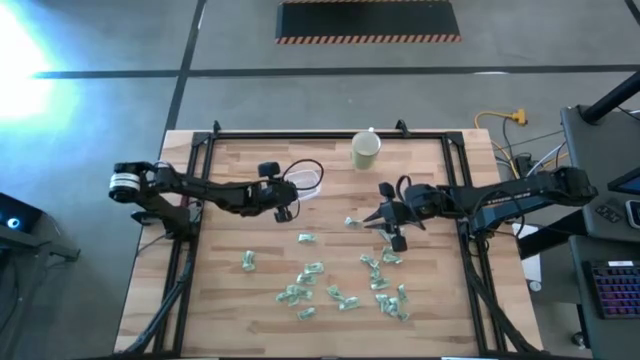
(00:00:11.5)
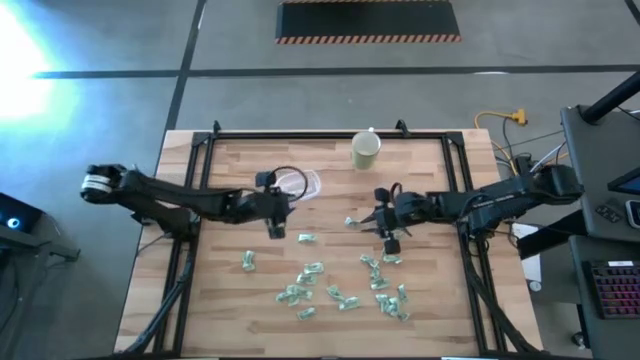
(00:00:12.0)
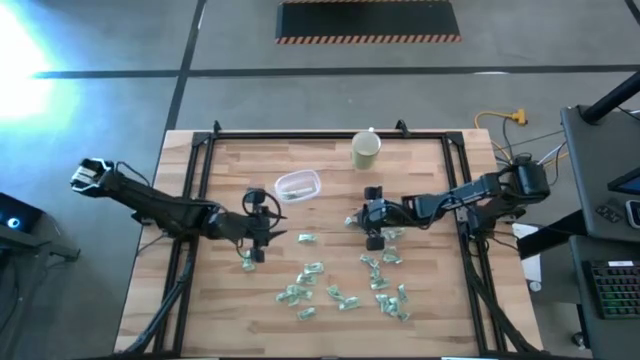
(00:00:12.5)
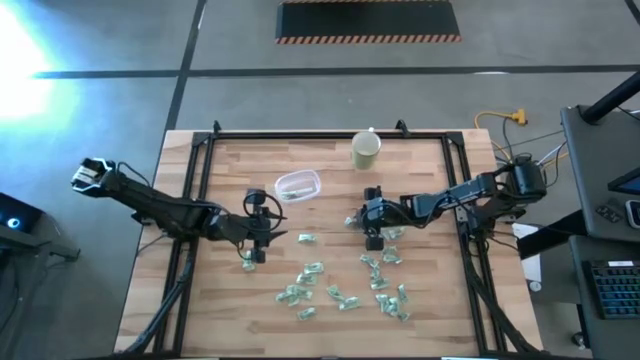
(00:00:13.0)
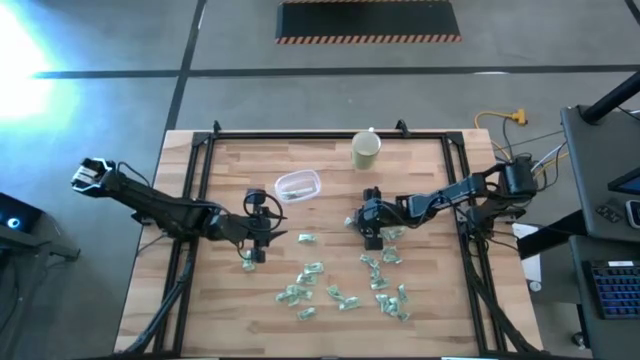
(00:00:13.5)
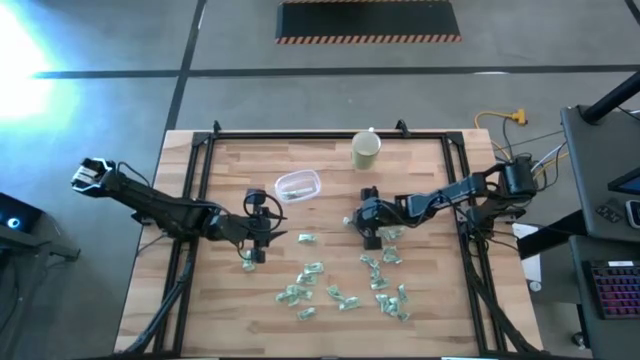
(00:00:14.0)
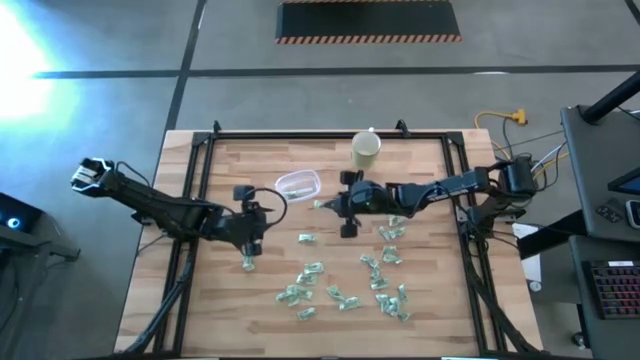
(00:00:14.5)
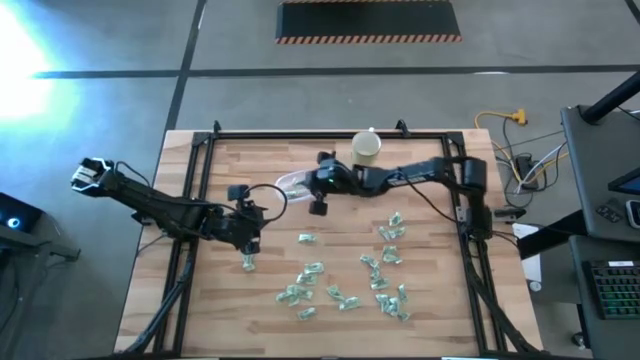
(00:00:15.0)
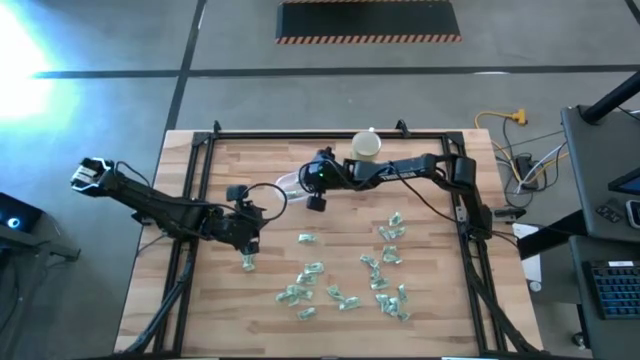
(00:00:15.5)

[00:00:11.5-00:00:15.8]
Task: Pick and place Stevia / Truvia into bins
Put the stevia packet into the transparent container

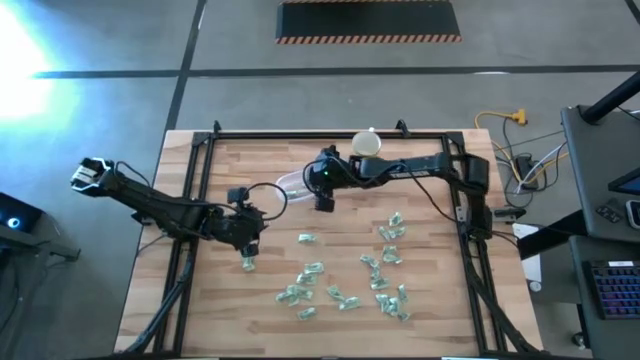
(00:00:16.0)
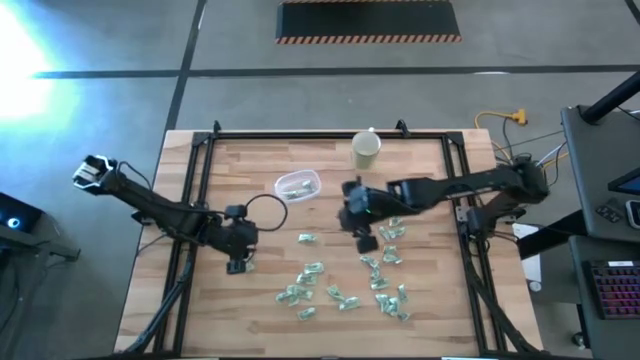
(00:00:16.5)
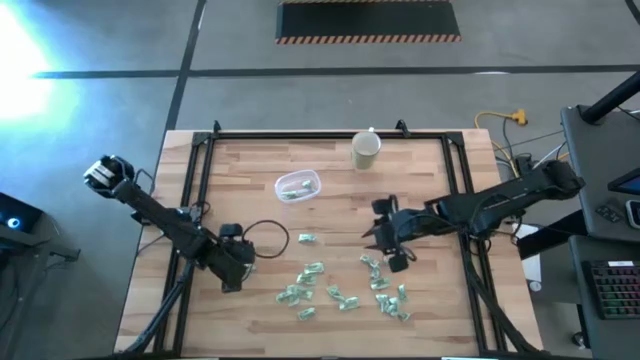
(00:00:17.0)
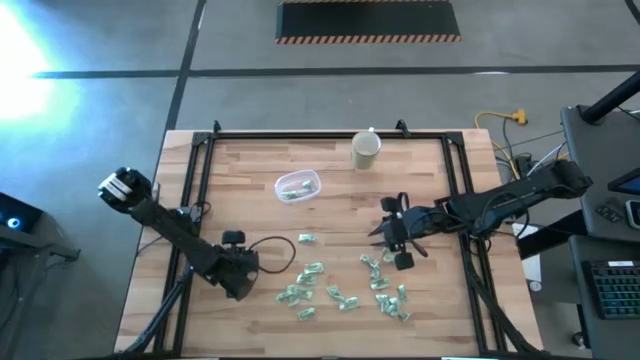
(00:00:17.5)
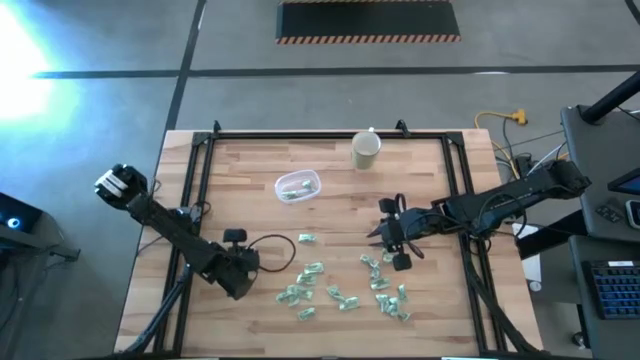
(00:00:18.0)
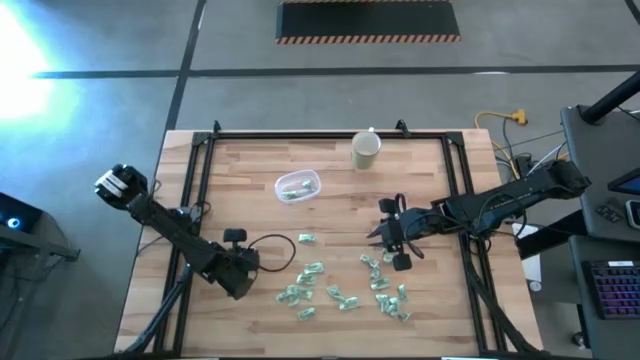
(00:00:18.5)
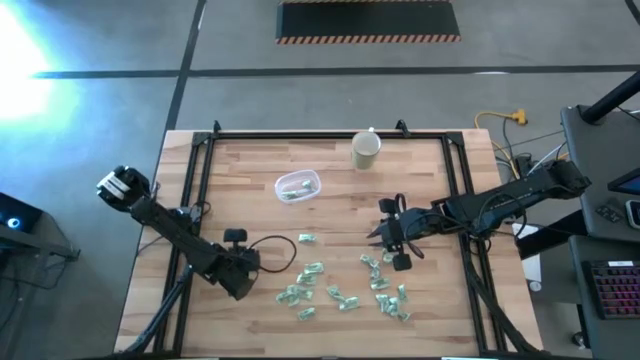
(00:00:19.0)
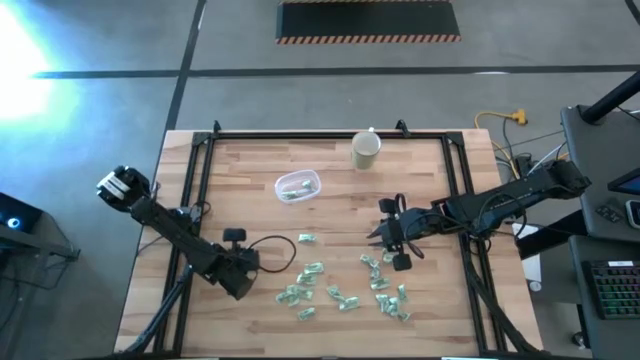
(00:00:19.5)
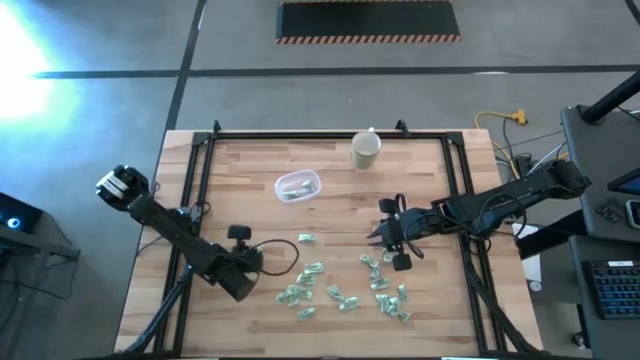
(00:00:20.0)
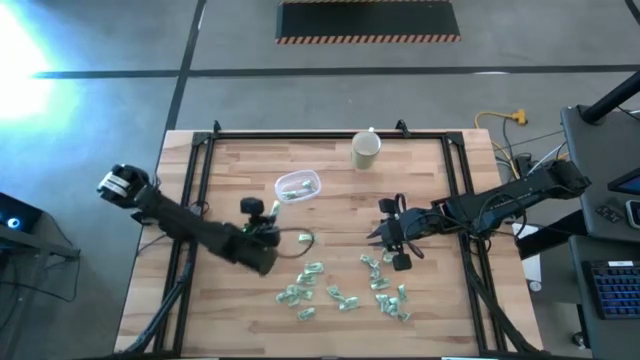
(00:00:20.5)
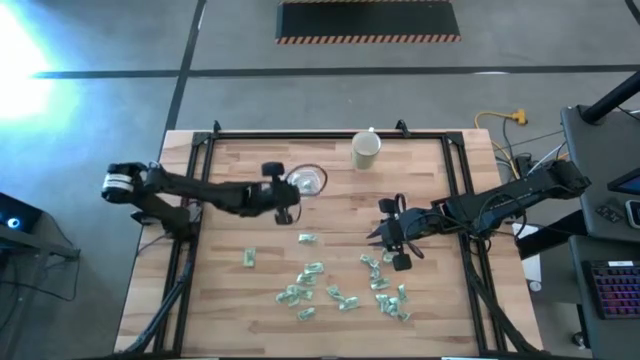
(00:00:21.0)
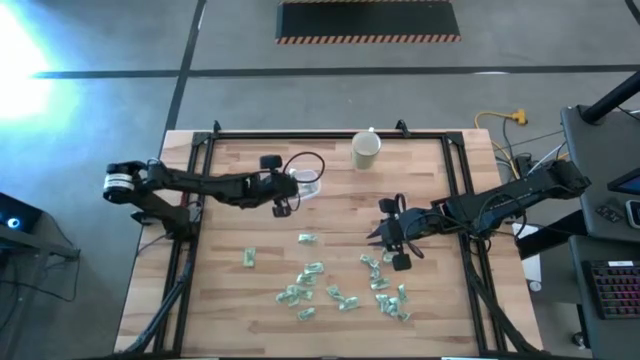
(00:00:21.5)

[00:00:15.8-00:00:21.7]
Put the stevia packet into the transparent container

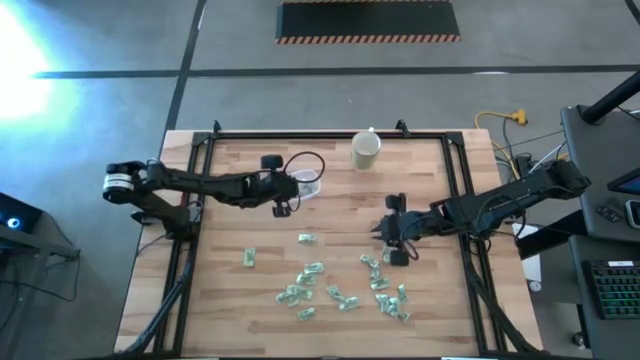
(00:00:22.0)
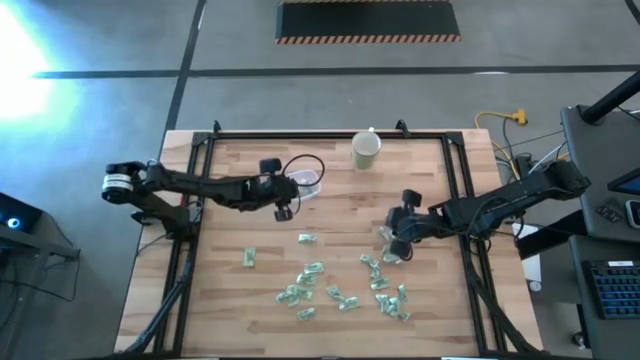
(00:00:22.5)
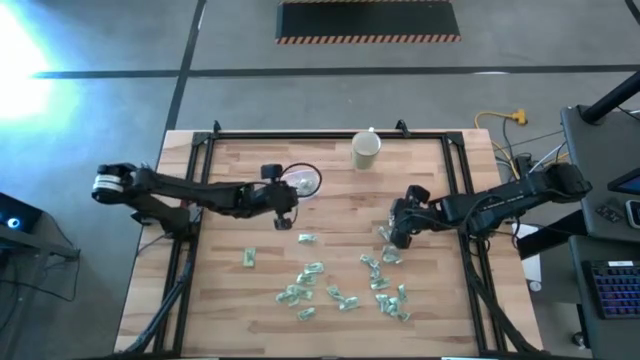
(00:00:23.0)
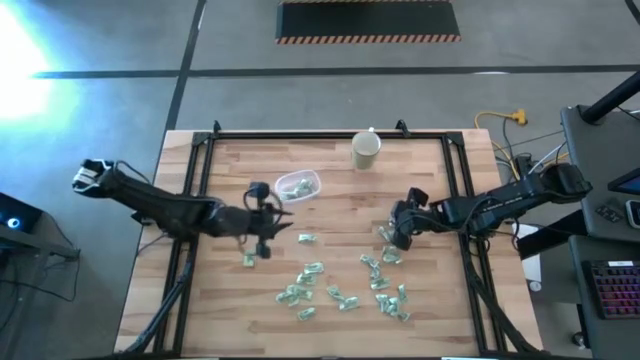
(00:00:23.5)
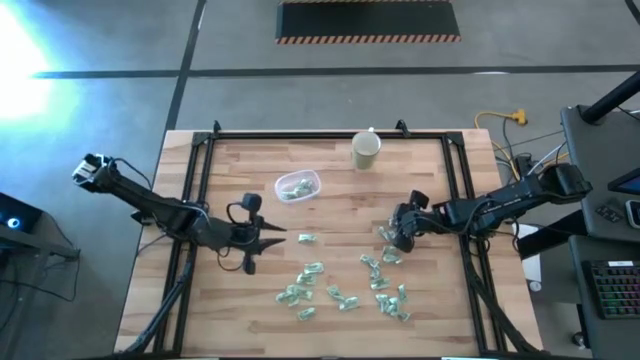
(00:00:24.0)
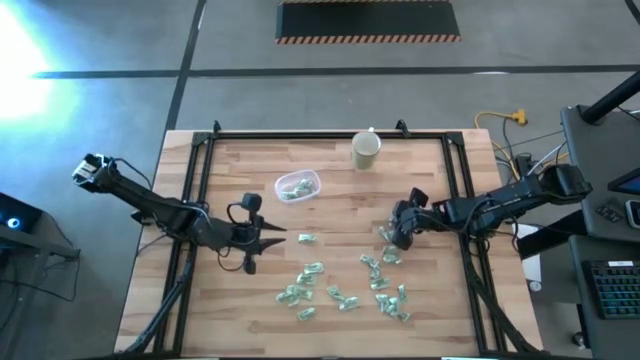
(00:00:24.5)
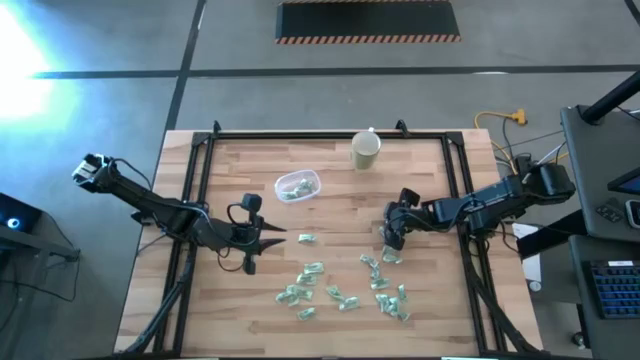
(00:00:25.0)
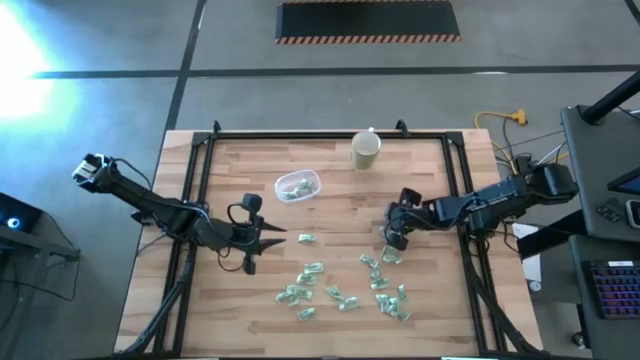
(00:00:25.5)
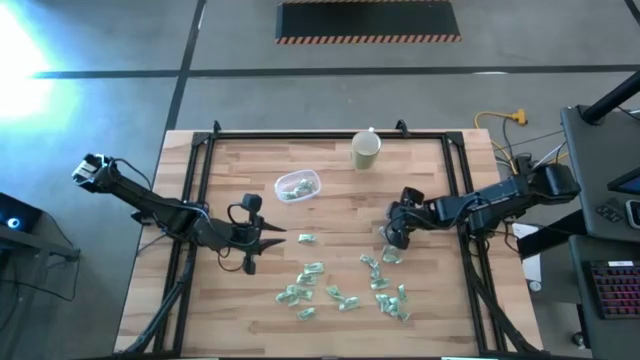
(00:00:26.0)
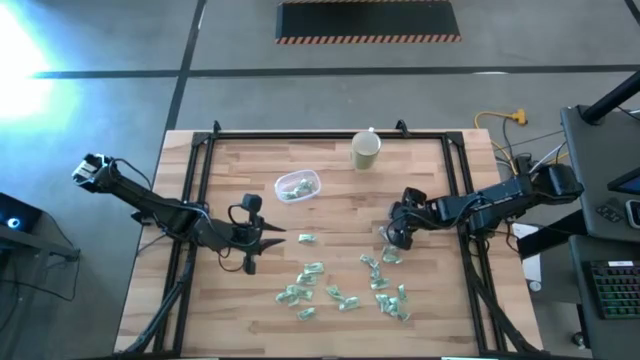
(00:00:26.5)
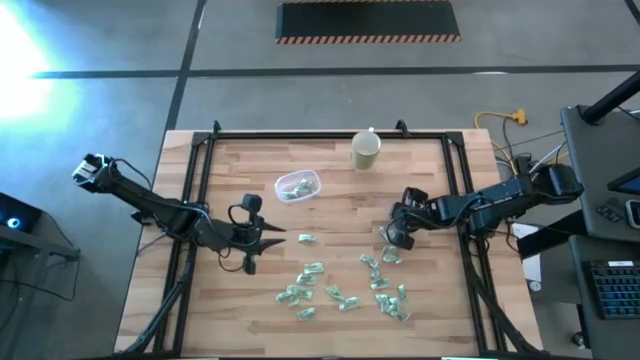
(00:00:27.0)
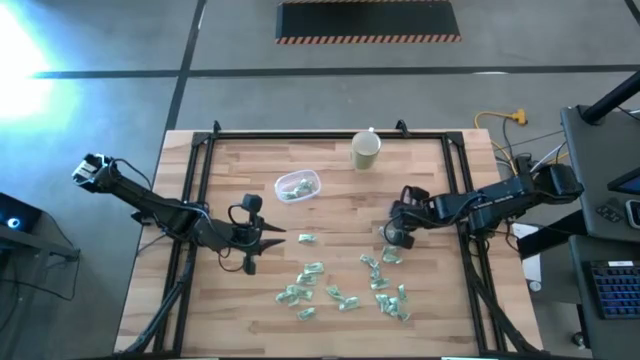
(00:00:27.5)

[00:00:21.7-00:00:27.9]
Put the stevia packet into the transparent container

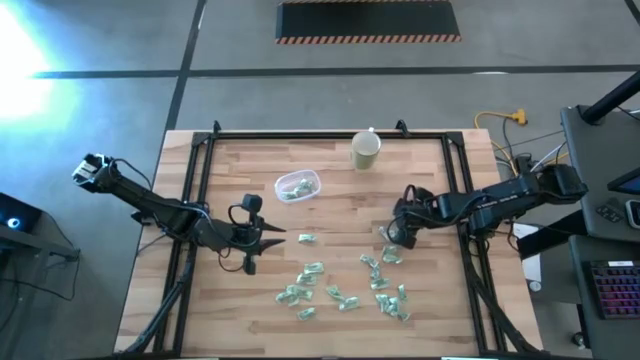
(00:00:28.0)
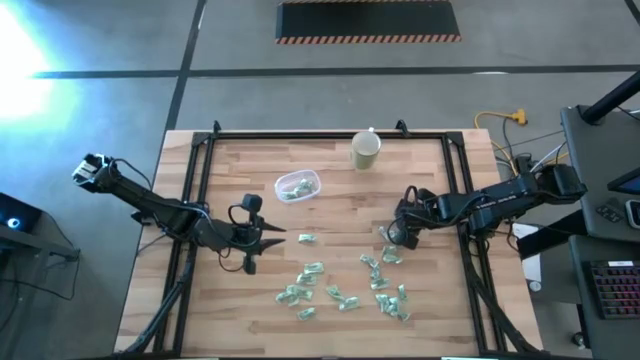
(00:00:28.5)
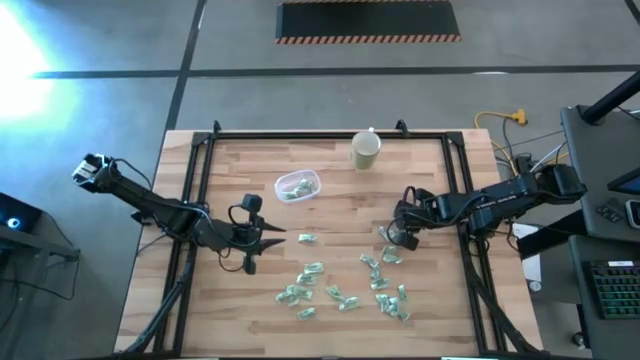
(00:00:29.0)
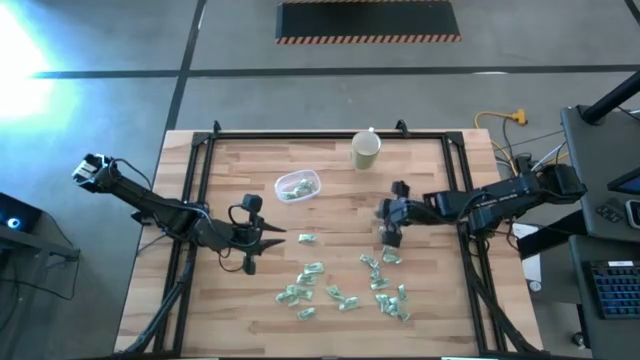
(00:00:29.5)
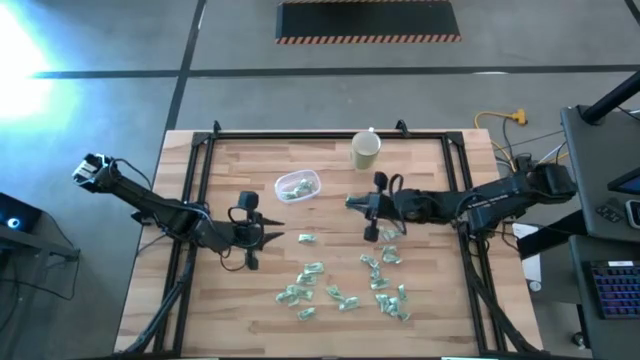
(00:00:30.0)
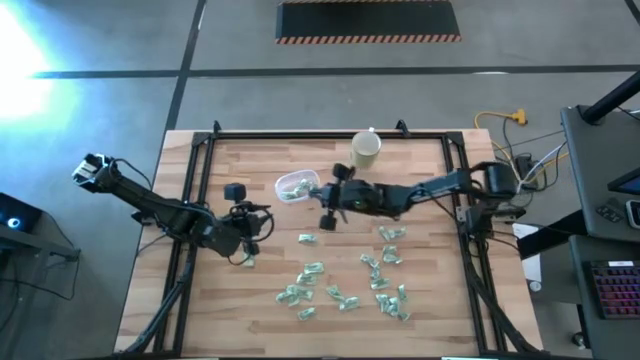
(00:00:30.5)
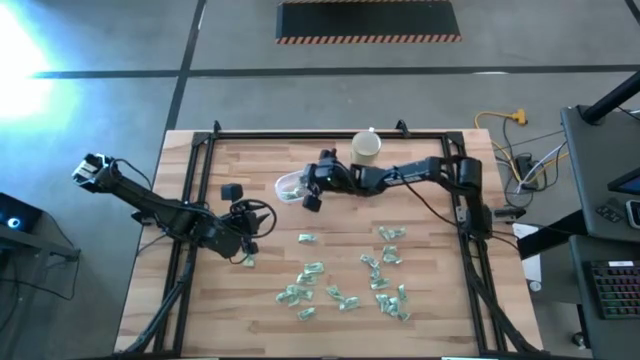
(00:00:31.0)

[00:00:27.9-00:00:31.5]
Put the stevia packet into the transparent container

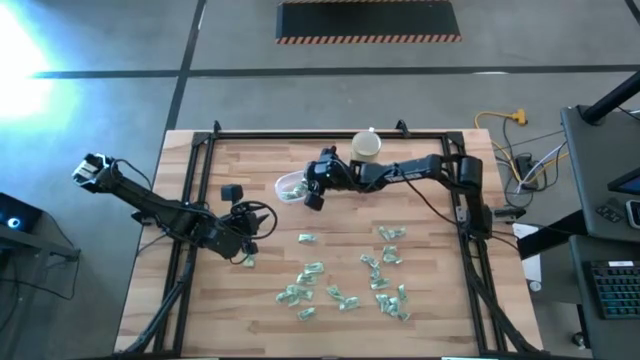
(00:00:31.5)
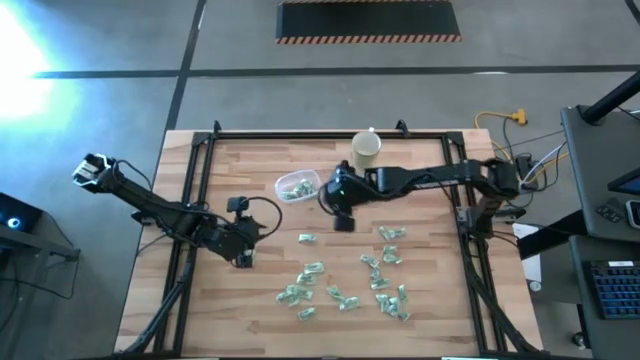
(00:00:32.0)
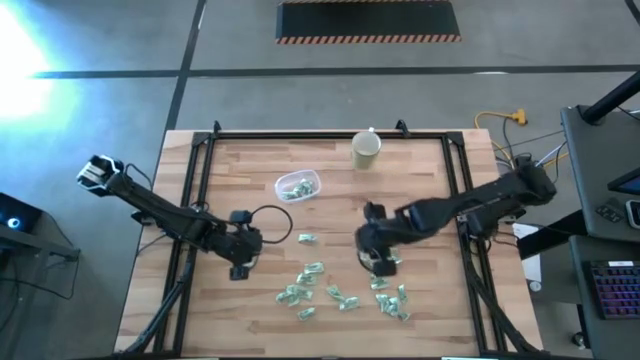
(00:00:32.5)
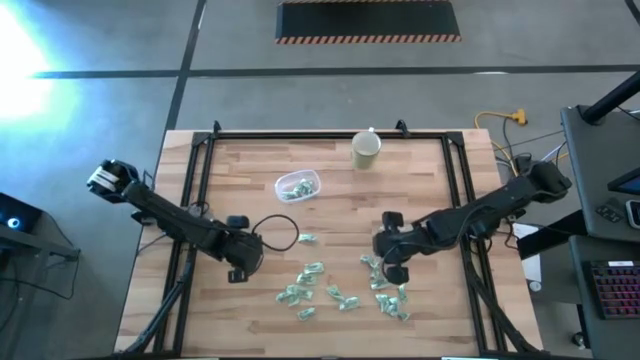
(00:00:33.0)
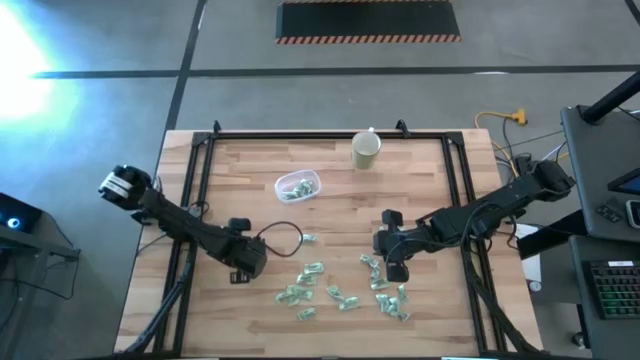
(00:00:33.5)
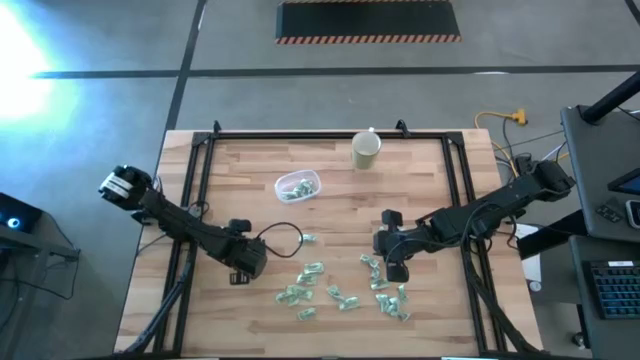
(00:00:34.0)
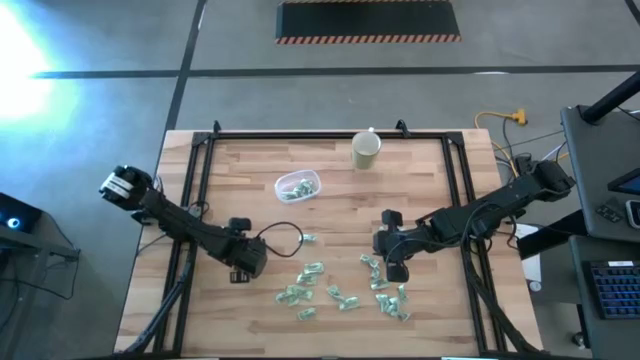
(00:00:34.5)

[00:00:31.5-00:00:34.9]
Put the stevia packet into the transparent container
